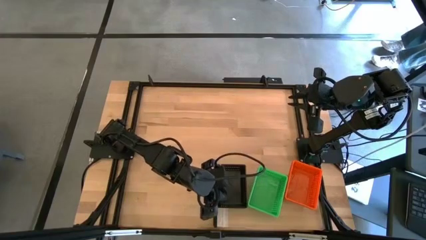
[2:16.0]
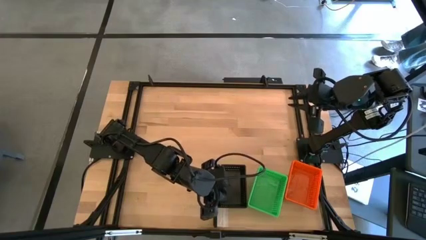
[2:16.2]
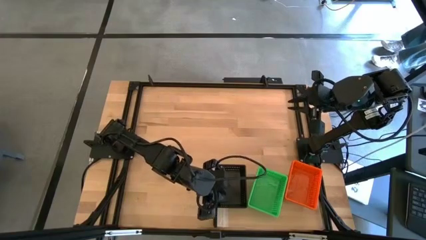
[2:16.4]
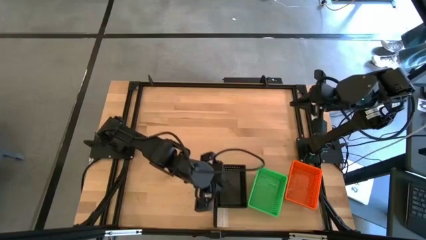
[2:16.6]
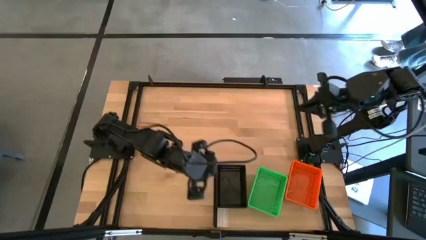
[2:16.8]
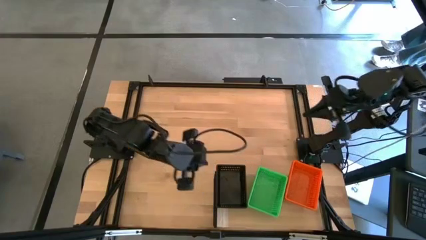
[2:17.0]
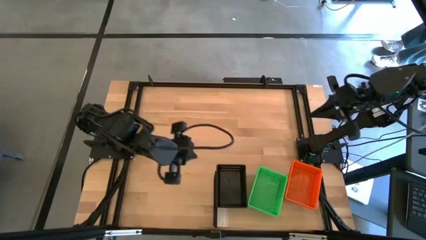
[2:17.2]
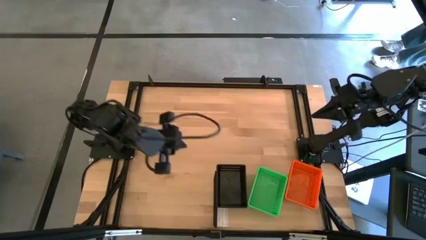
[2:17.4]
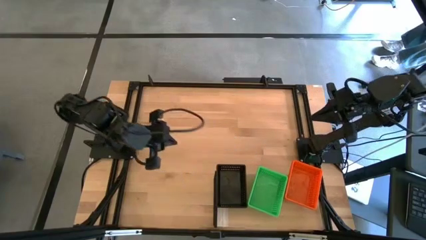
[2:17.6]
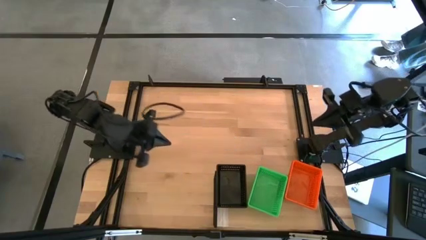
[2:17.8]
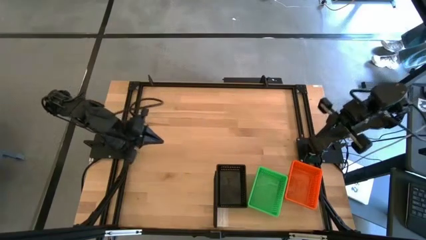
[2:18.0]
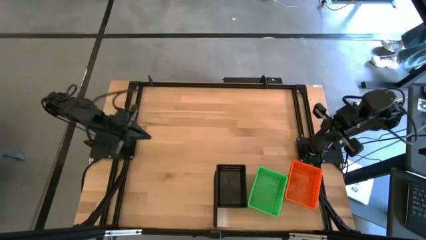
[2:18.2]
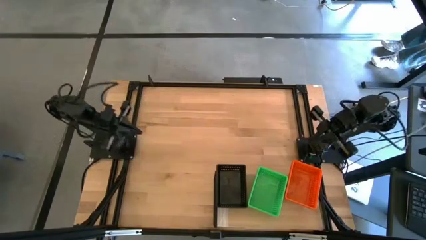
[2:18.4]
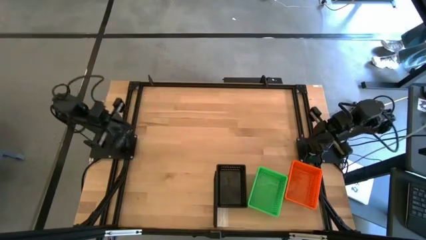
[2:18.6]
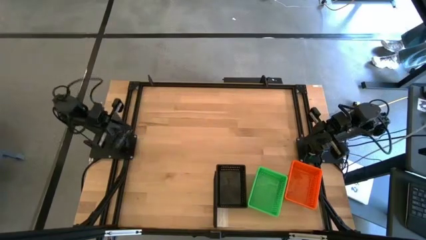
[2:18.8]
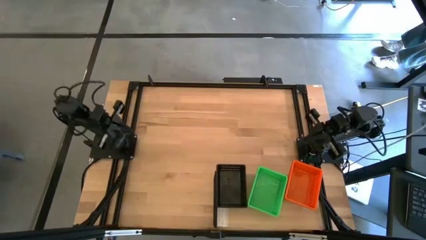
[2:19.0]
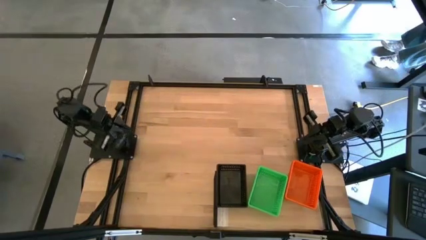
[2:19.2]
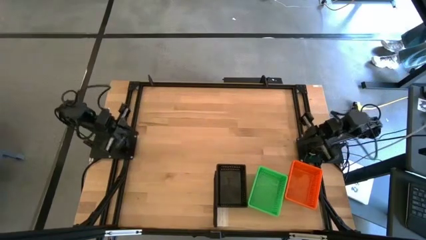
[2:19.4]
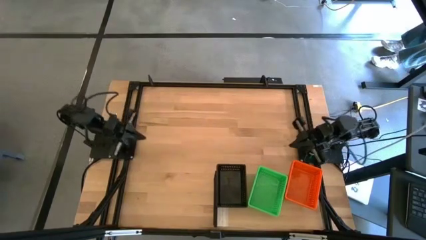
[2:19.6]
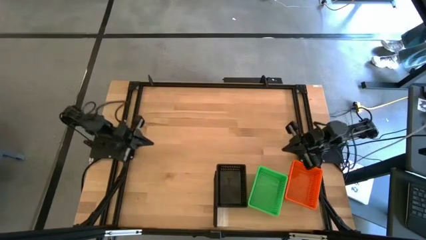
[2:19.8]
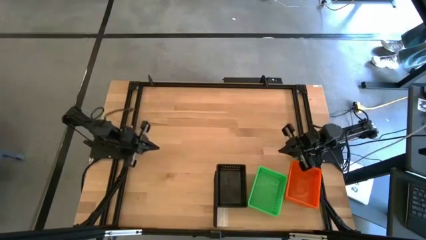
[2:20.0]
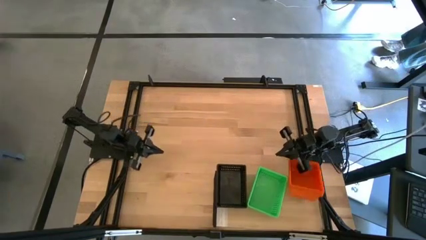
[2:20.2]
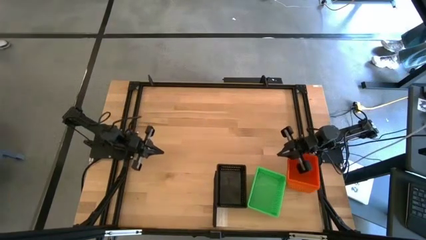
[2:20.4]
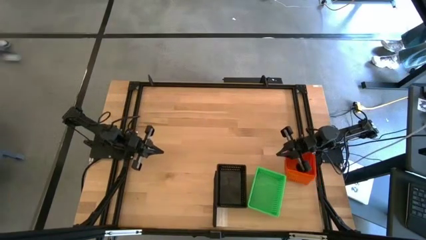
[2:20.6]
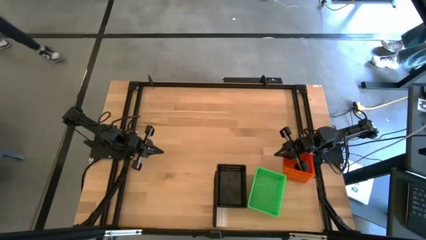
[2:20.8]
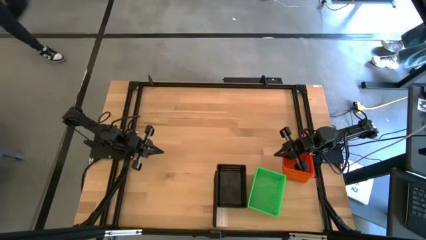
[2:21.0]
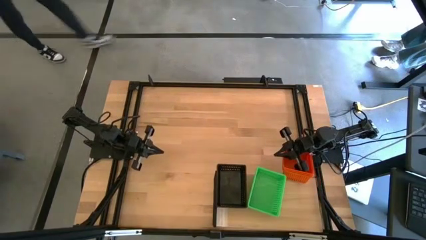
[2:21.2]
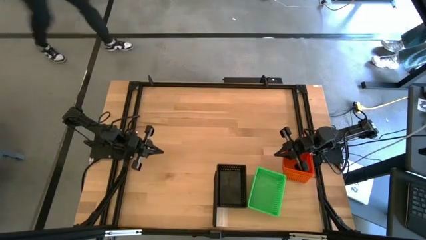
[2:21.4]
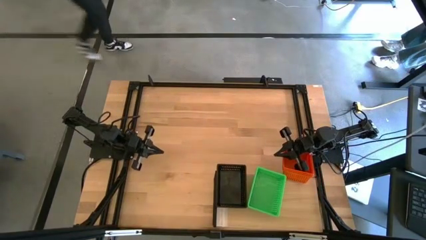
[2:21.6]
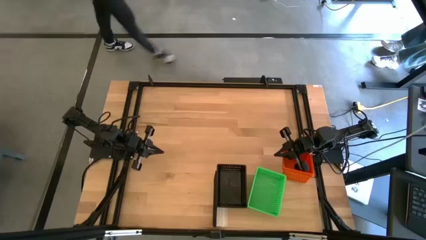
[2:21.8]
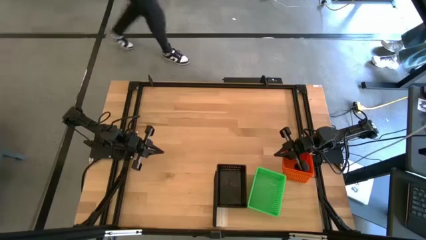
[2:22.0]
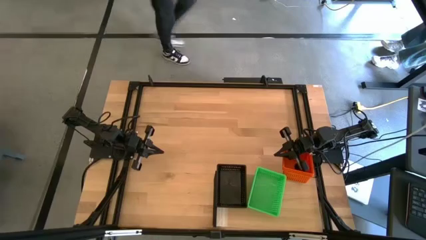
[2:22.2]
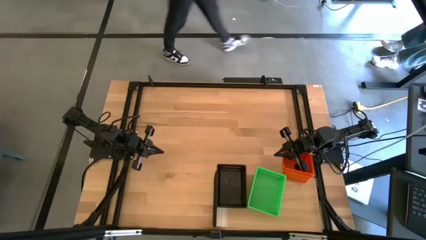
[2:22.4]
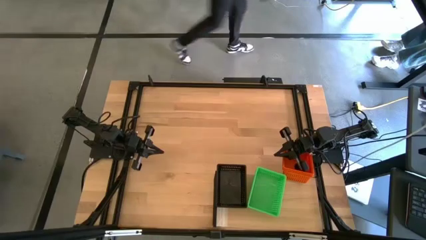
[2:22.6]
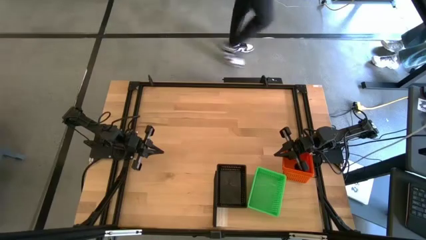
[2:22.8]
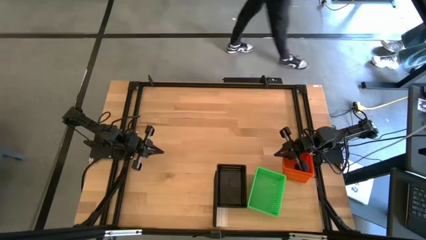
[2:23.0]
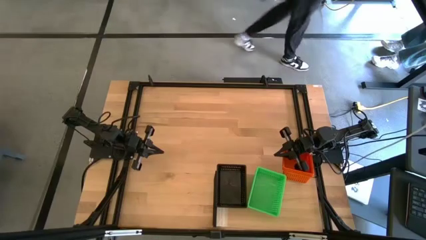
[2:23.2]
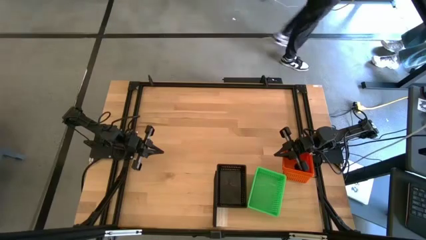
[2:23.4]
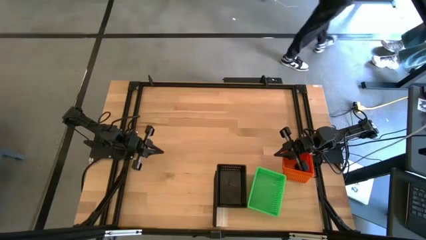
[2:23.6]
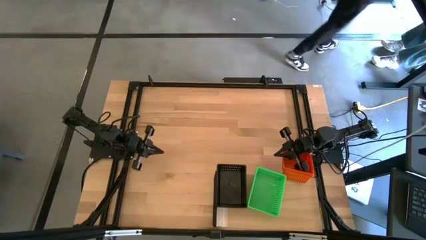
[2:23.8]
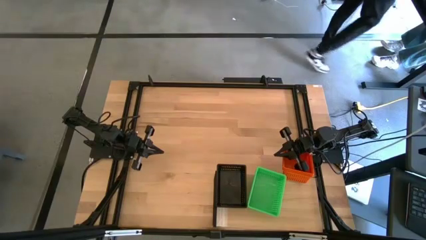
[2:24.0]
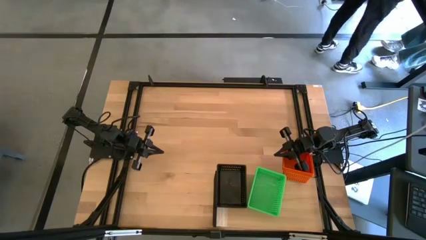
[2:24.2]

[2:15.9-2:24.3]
Task: Stack baskets on shelf by color
Return to Home Position

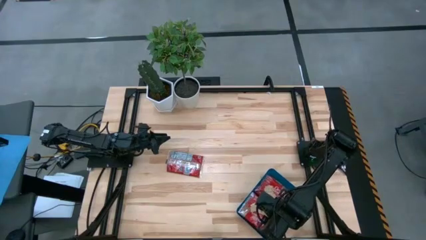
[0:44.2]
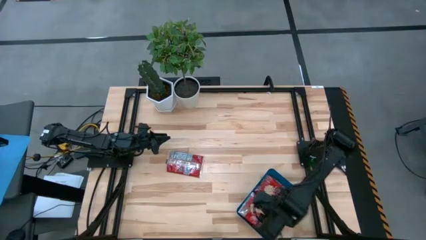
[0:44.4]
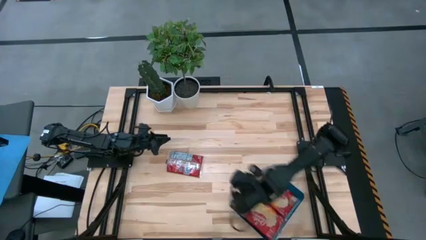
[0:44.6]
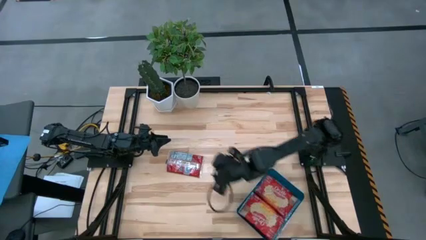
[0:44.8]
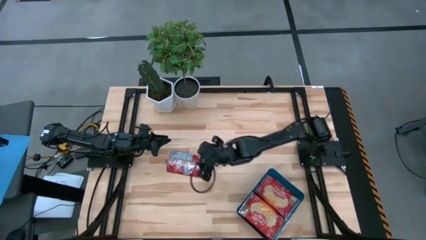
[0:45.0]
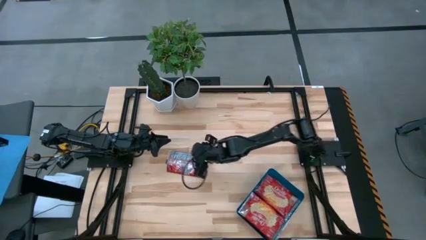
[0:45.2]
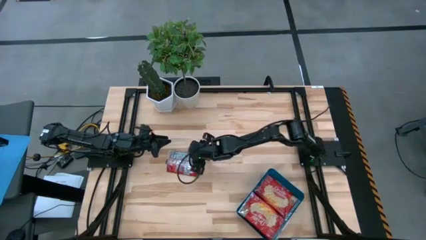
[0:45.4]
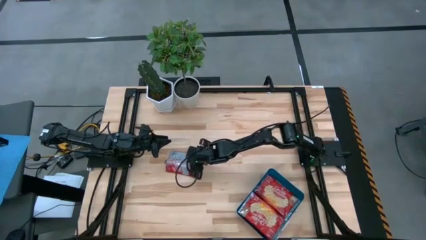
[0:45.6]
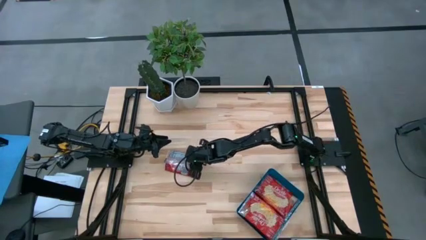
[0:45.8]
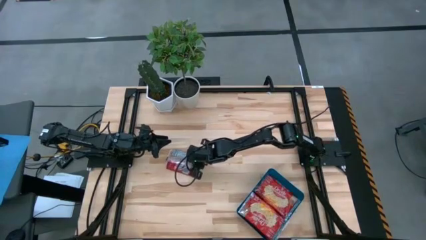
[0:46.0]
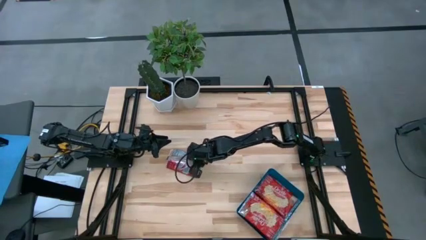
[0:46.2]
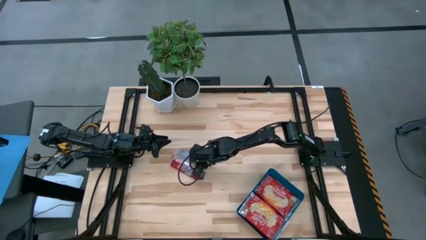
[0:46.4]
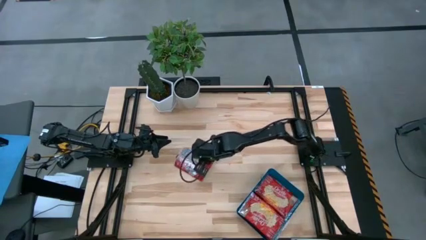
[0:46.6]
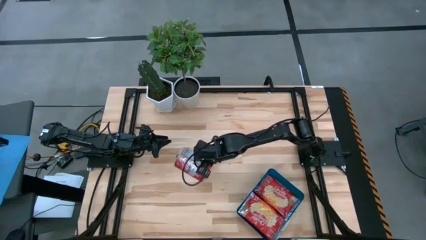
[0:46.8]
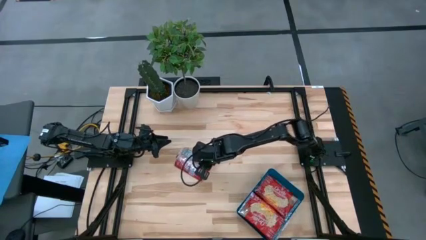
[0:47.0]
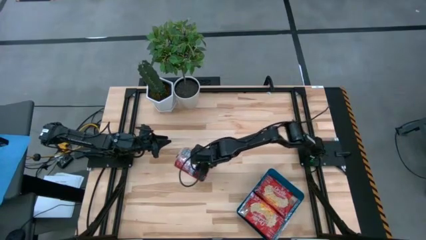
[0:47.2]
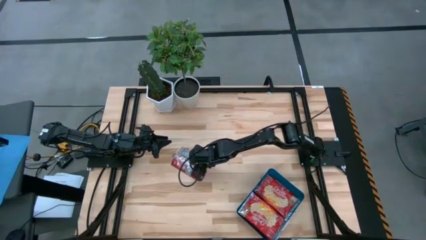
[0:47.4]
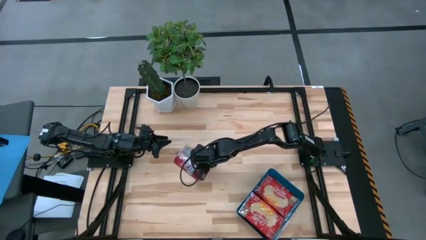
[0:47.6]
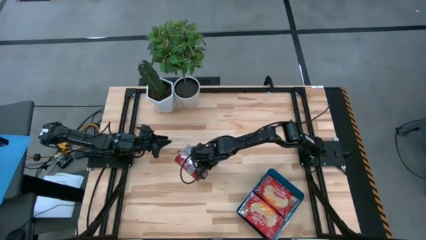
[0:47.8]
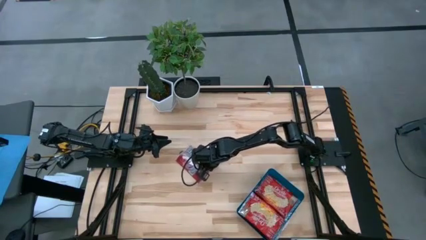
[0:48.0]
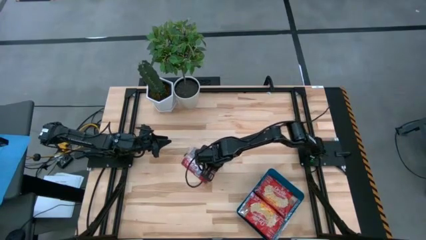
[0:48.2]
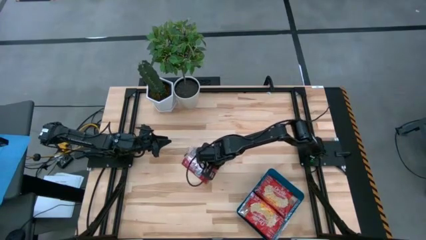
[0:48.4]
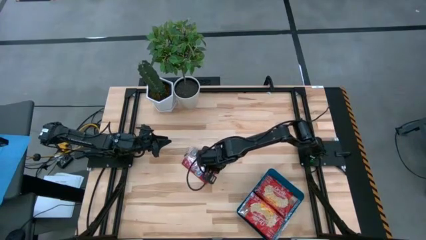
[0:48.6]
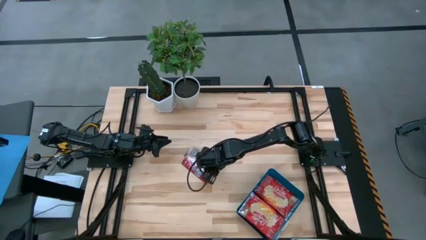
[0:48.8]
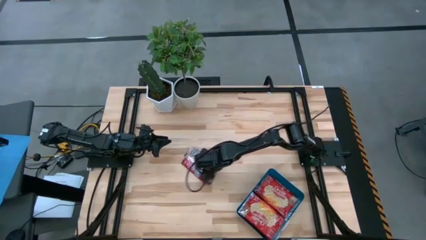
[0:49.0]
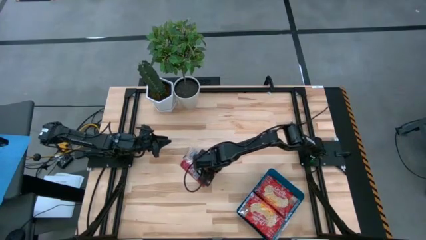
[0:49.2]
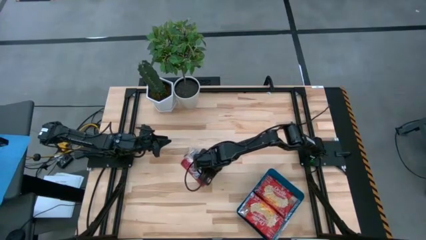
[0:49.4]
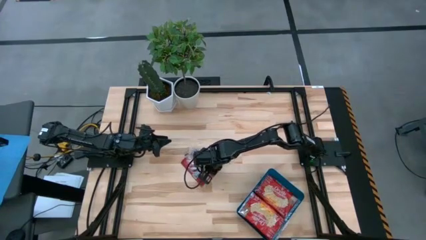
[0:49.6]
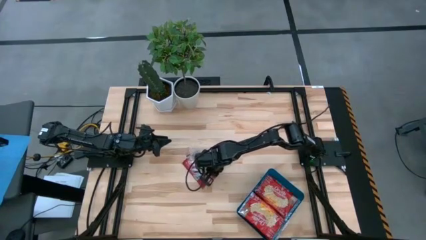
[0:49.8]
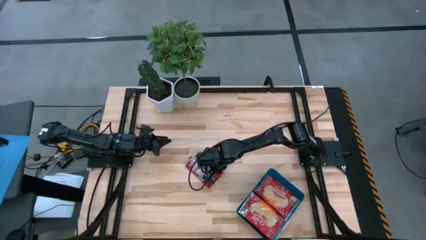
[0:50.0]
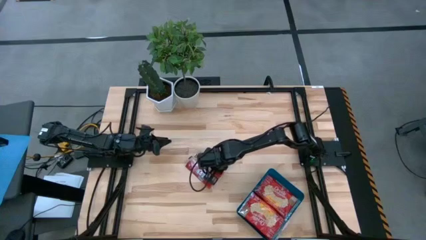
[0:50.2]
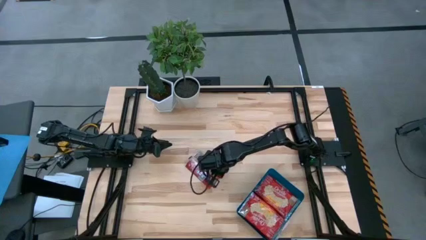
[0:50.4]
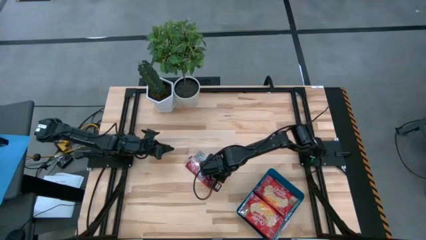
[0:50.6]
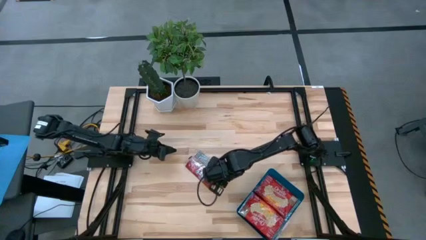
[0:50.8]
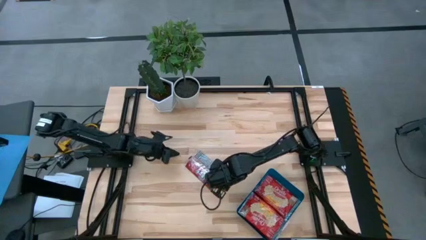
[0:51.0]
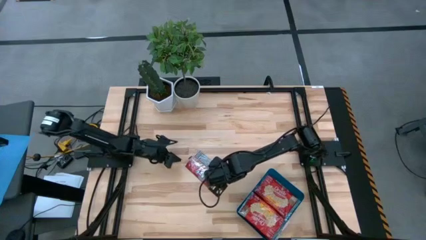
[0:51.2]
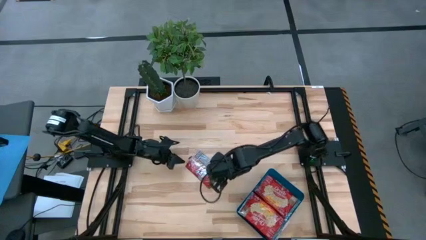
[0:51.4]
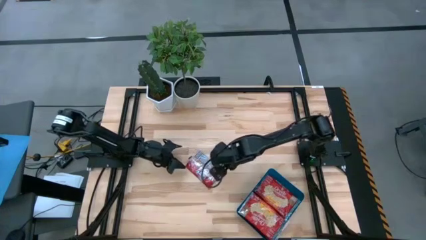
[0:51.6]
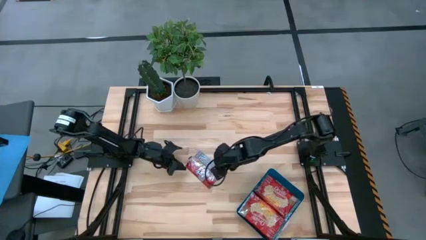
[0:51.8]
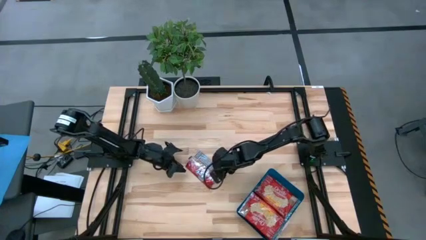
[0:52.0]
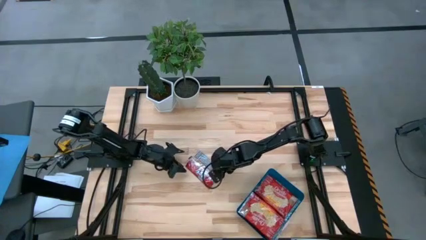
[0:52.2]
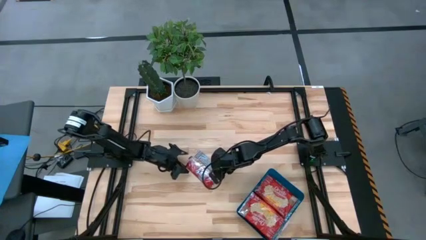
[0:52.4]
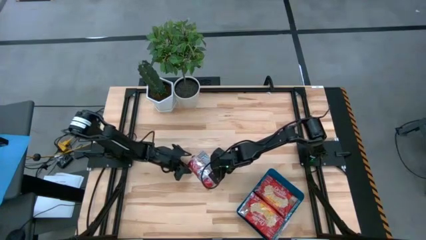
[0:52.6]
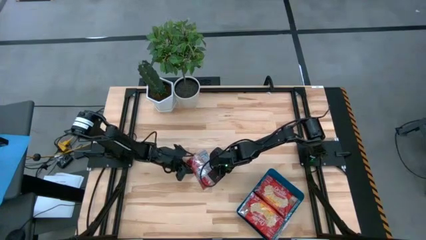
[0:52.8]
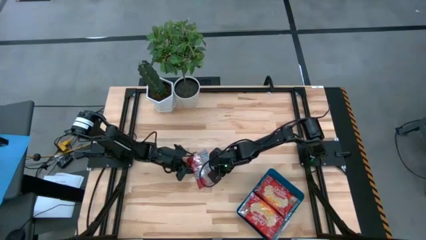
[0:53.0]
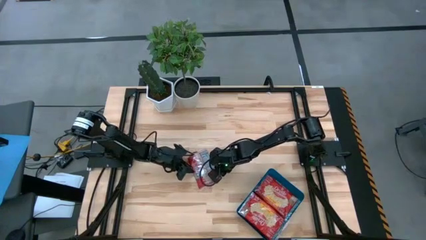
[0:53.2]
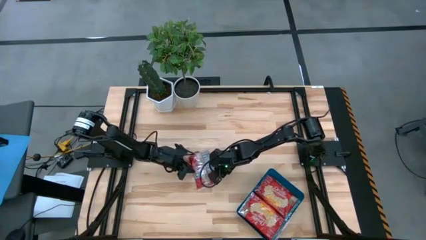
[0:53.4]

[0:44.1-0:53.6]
Task: Sort popcorn bags into baskets
Put the red popcorn bag into the blue bin
